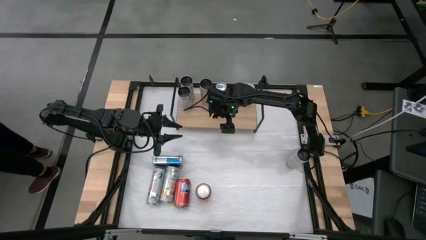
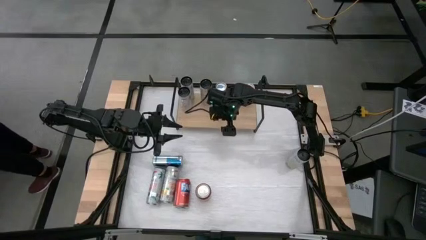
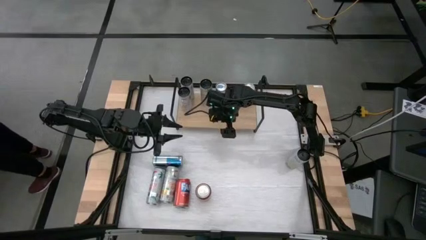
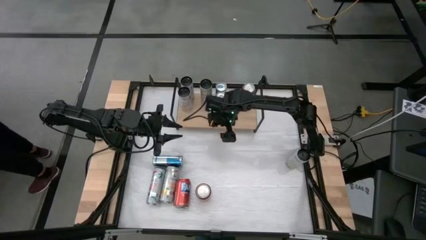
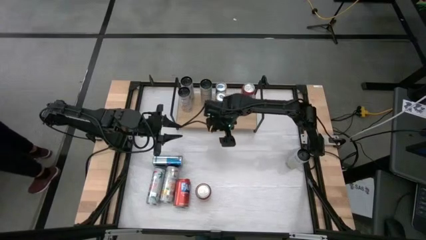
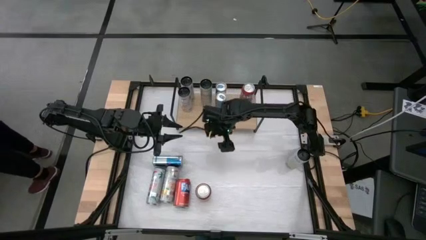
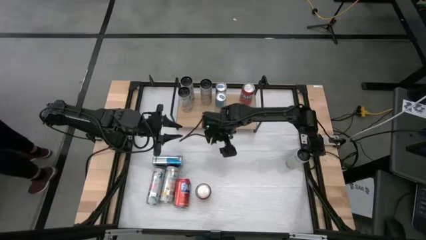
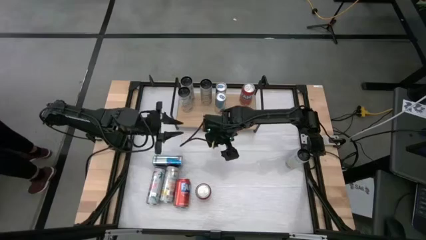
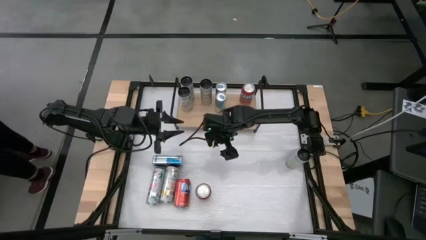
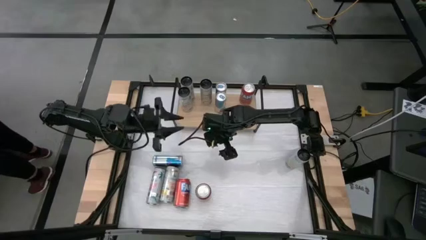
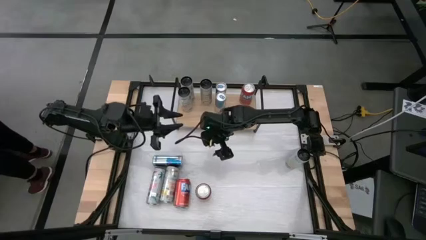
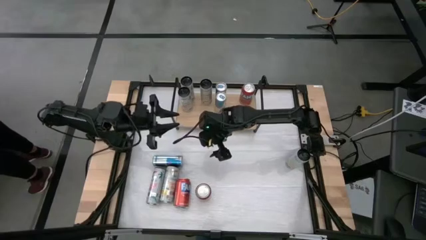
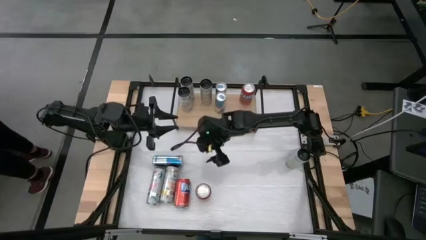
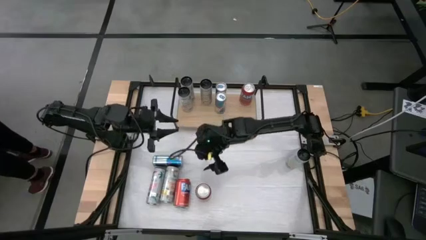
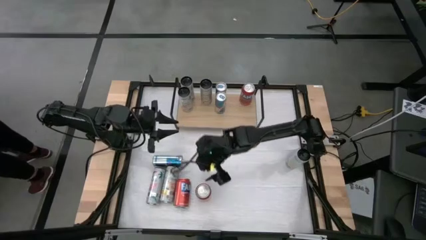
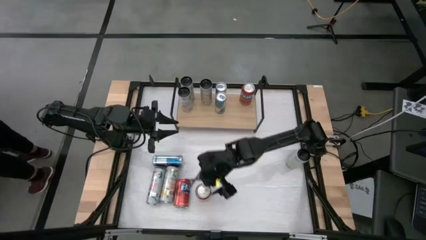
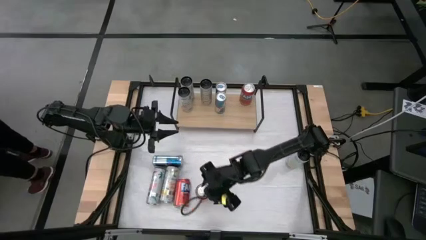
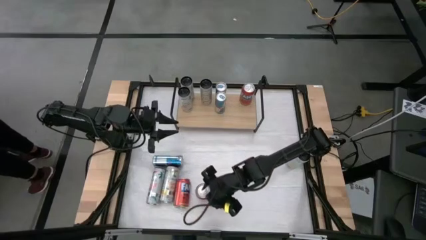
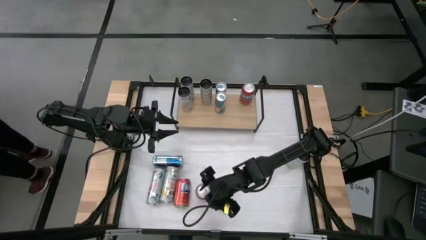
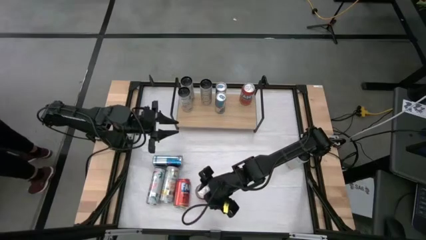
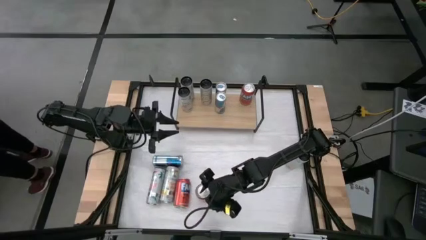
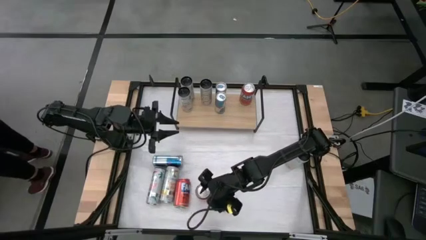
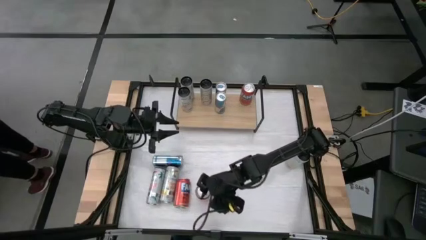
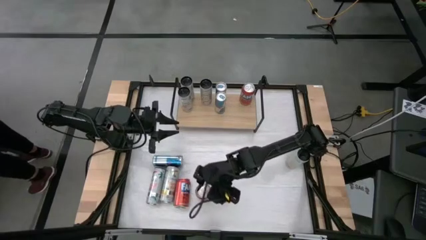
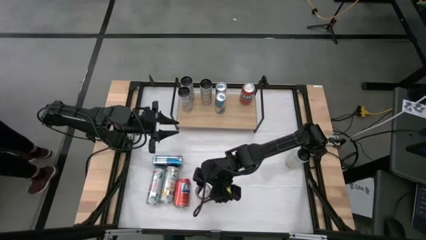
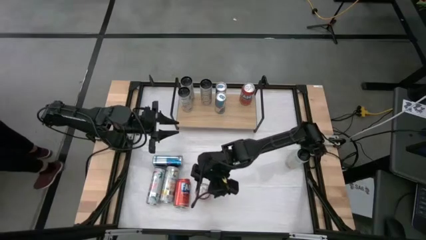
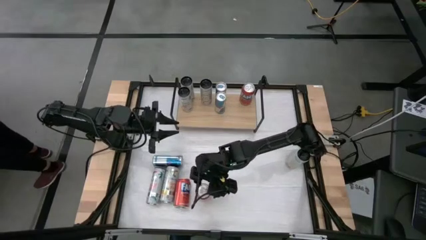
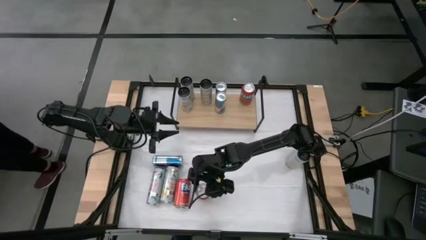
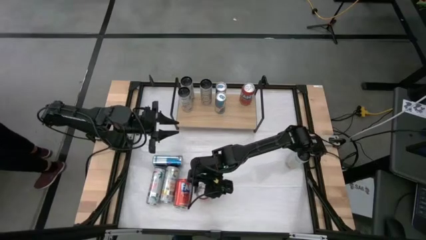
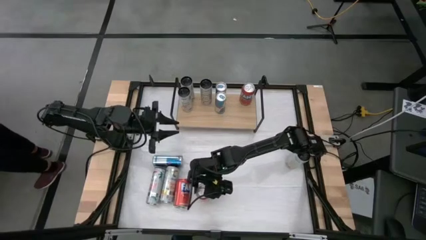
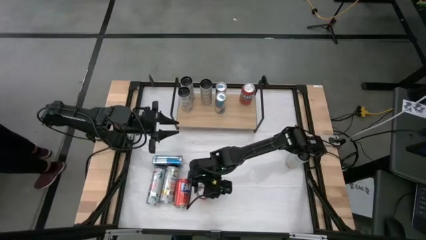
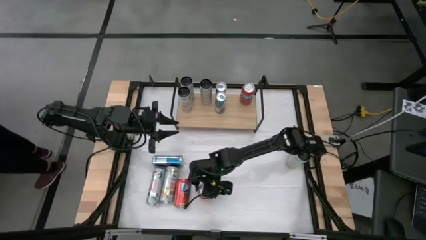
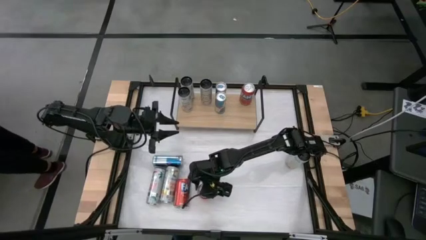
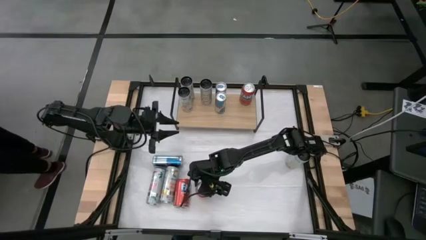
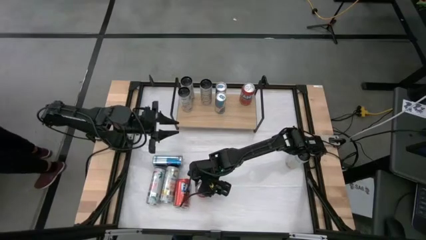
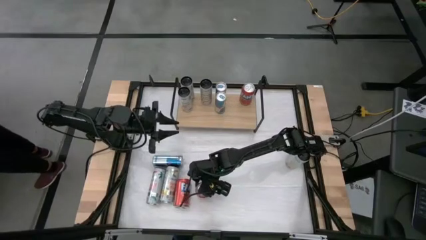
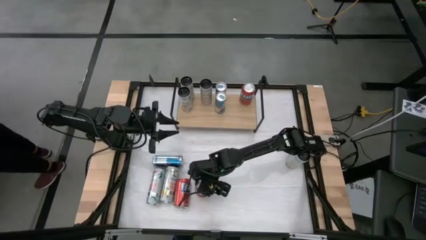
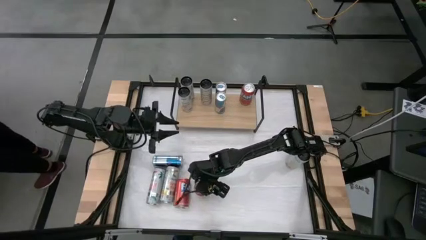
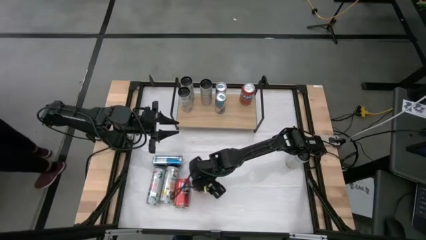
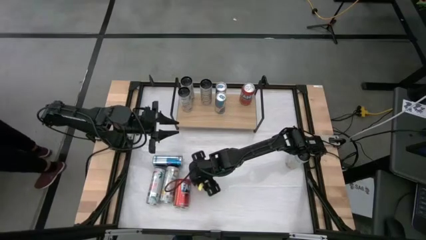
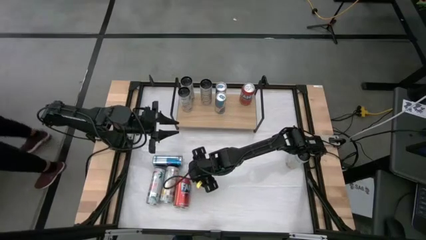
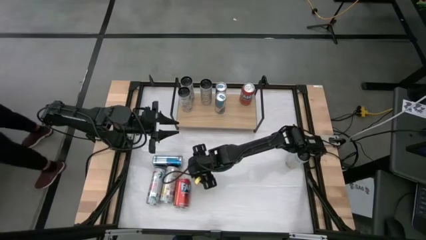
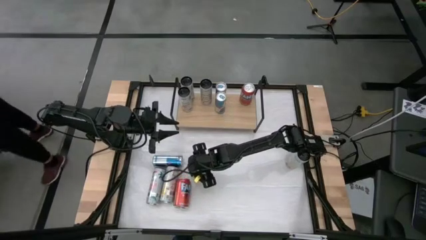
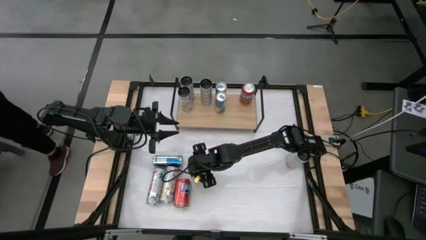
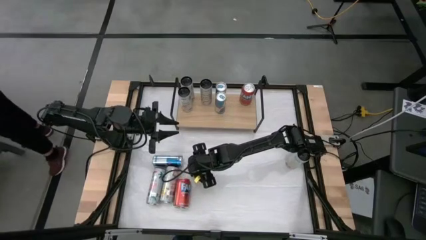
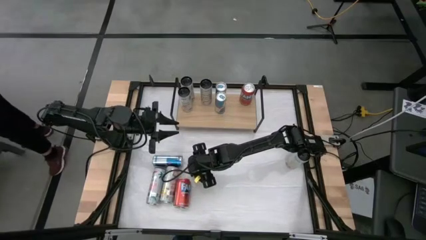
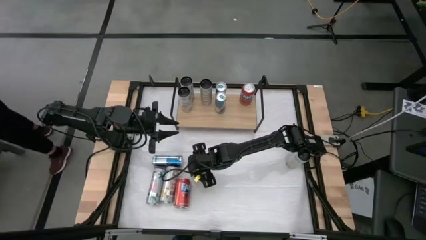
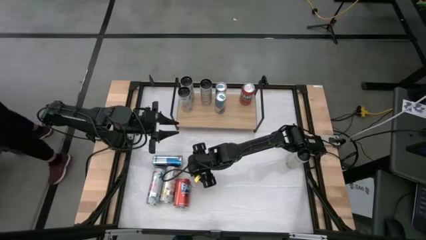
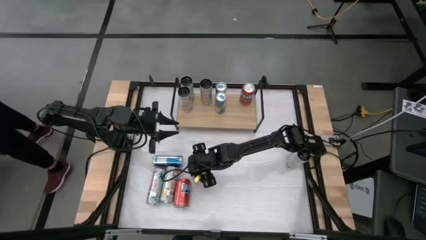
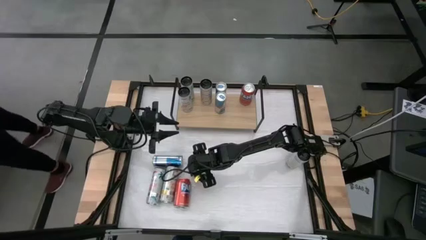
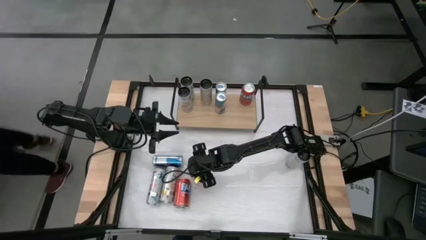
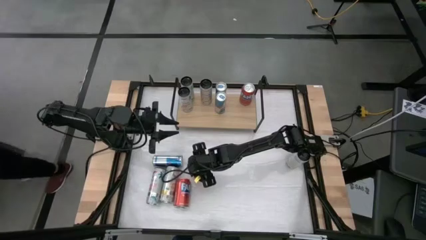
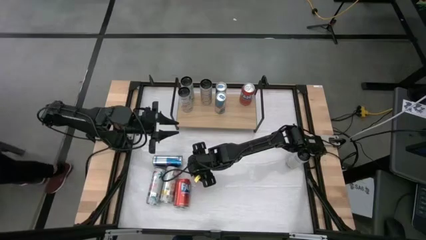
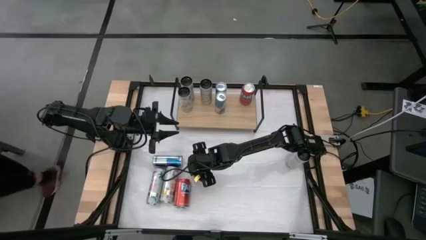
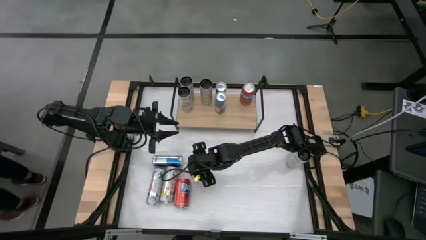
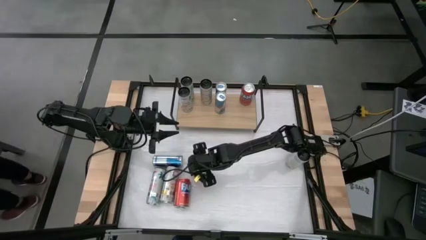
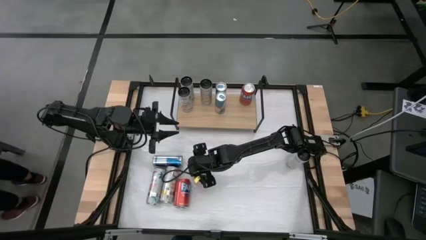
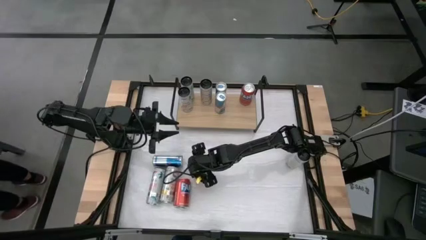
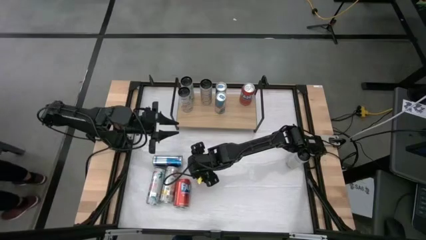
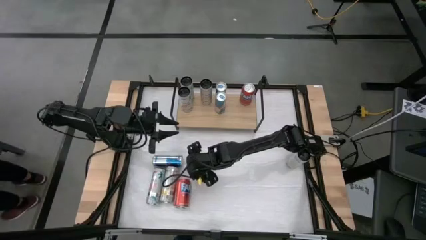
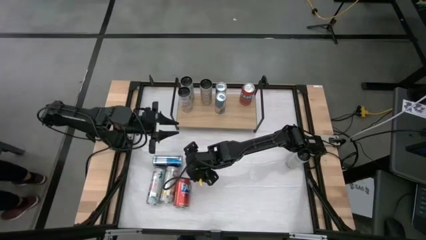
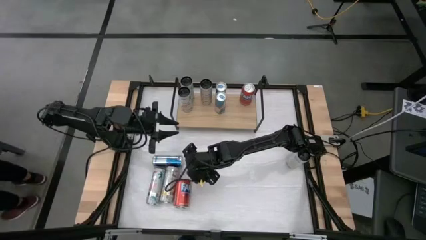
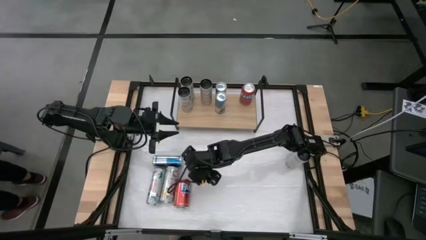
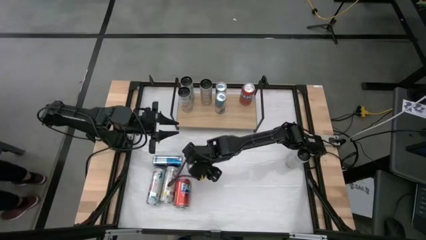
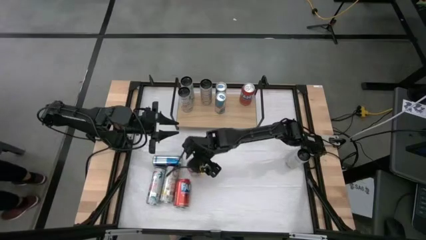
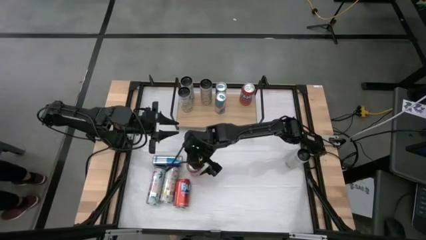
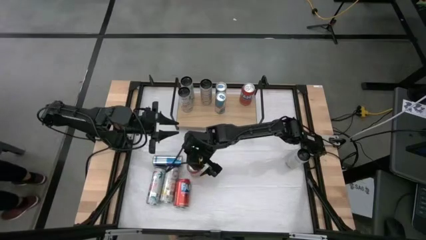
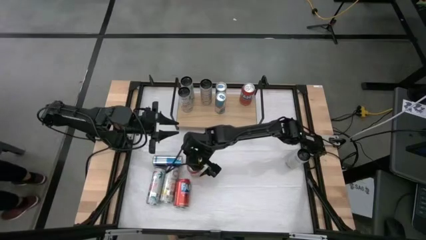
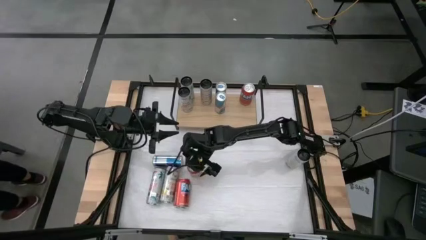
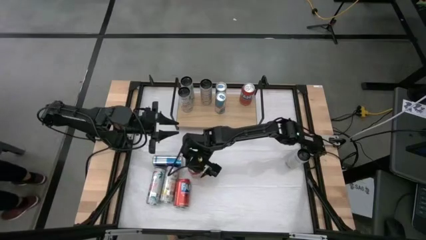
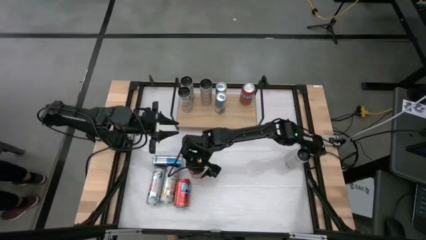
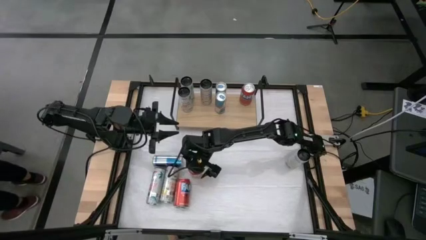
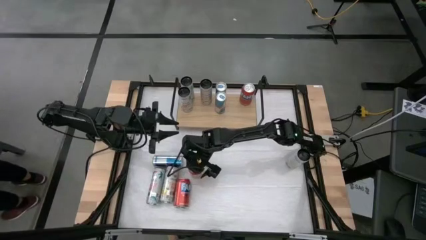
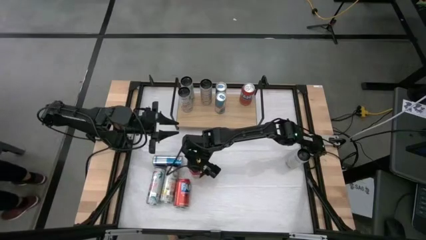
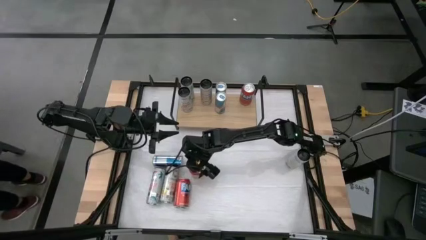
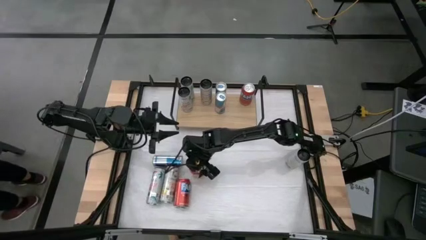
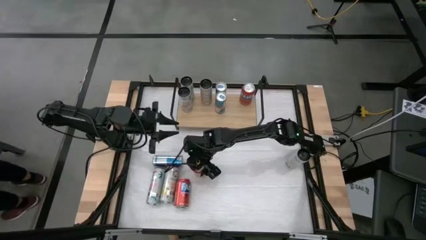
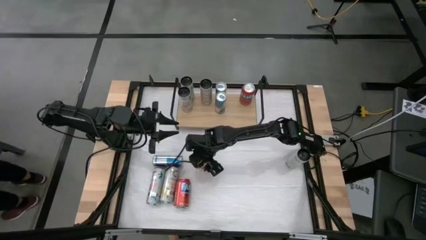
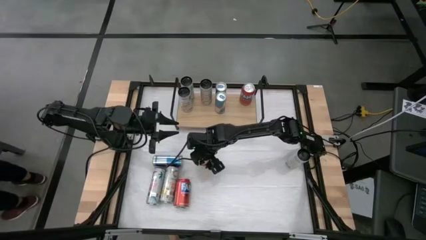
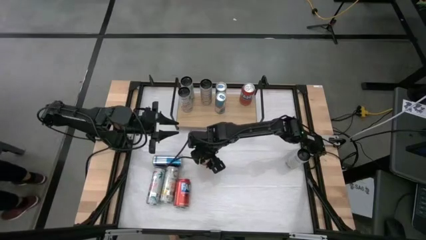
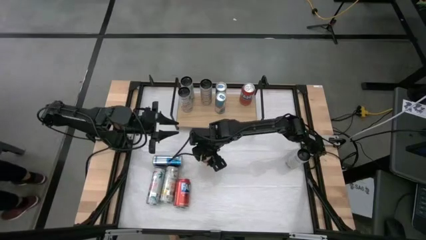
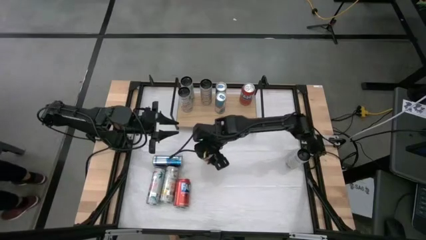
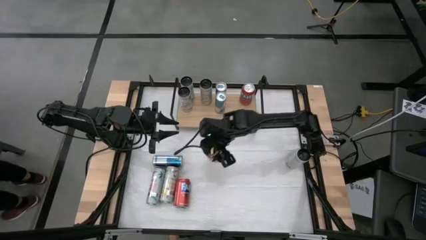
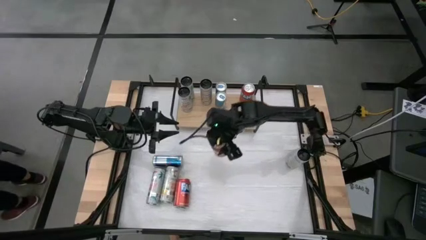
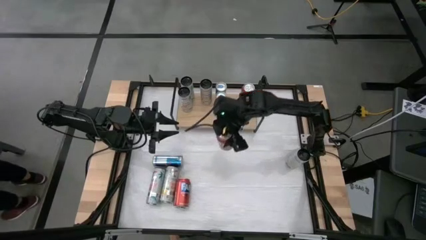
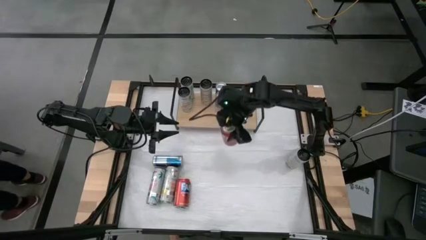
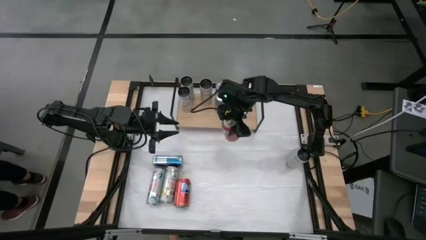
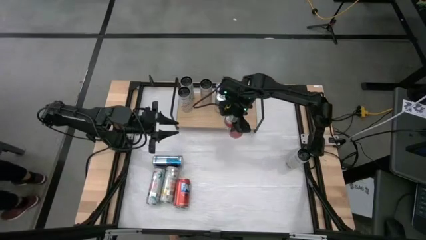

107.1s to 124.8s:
Task: Place canned beverage on shelf
Put the right red soda can on the shelf
